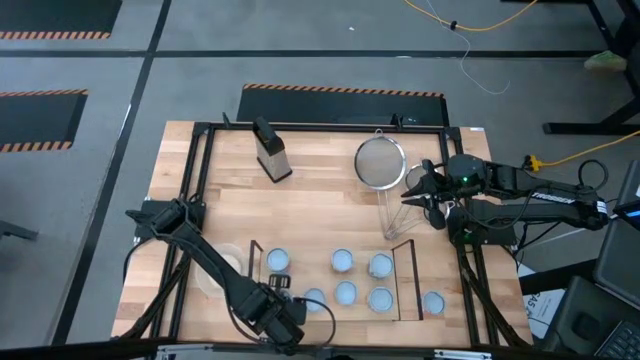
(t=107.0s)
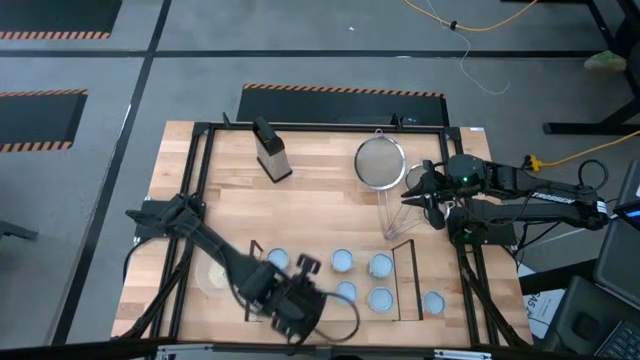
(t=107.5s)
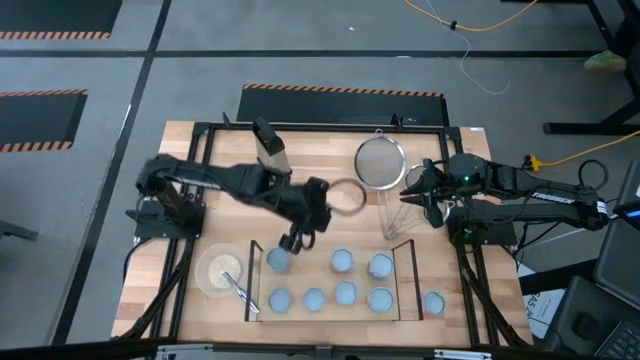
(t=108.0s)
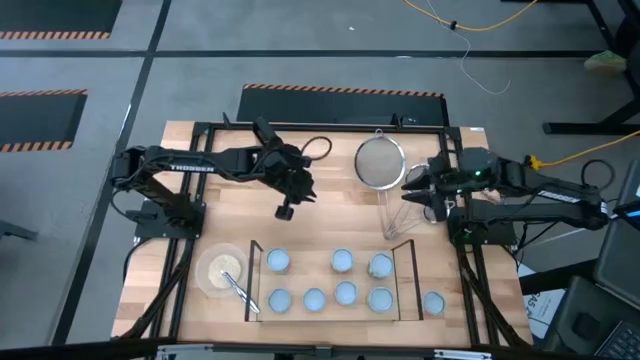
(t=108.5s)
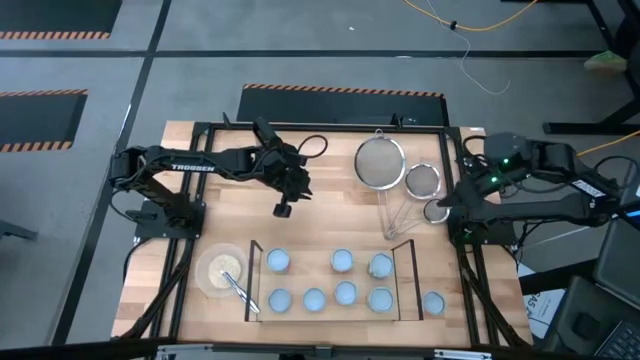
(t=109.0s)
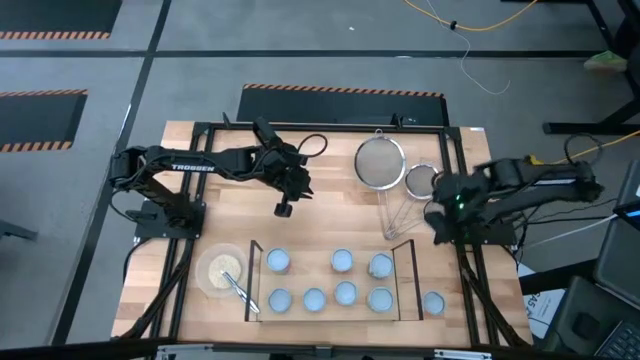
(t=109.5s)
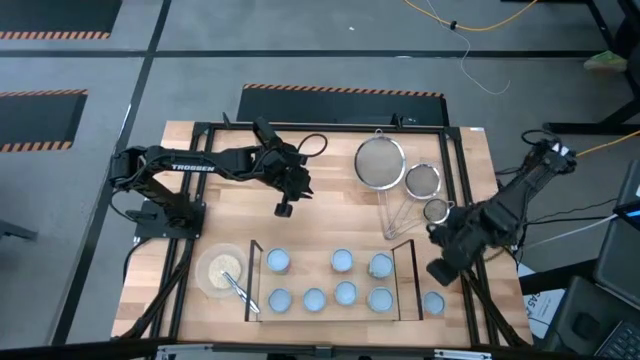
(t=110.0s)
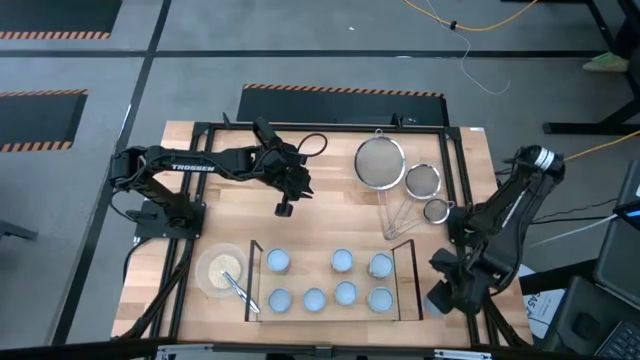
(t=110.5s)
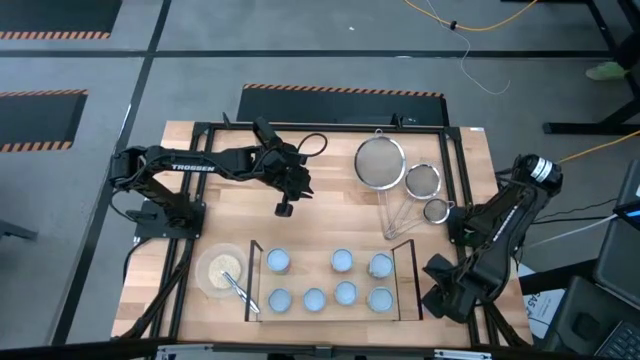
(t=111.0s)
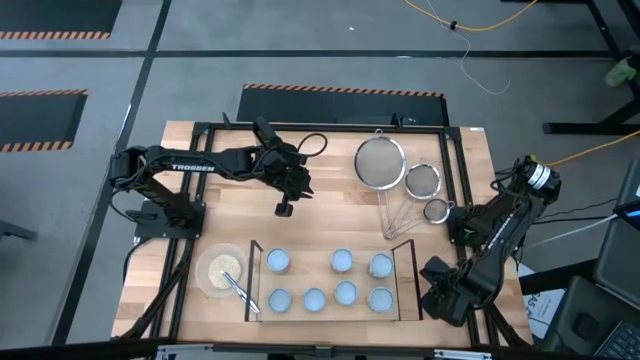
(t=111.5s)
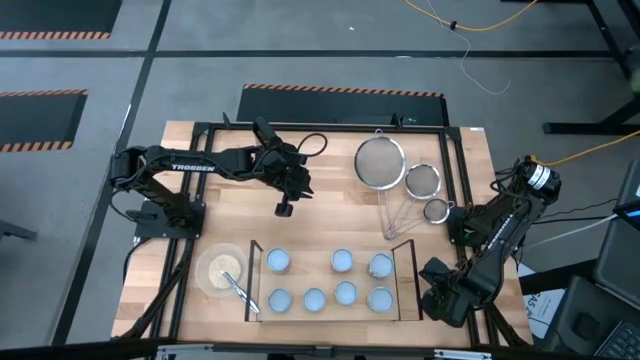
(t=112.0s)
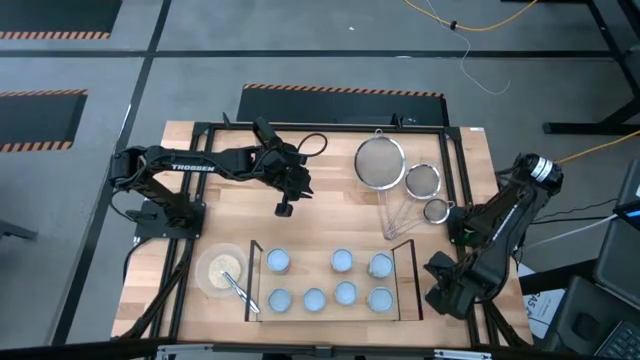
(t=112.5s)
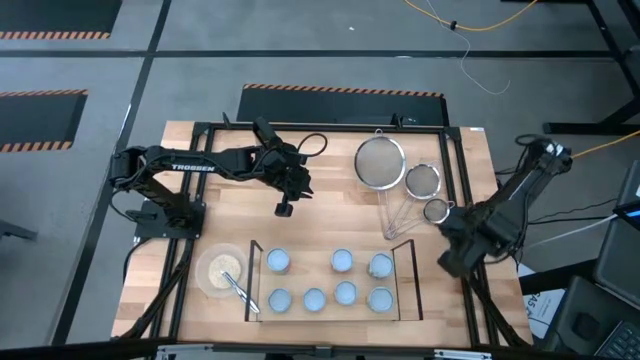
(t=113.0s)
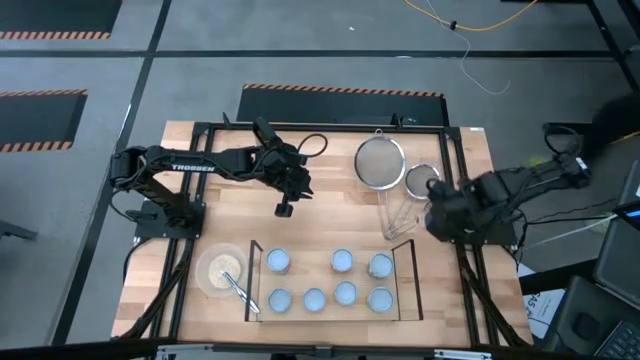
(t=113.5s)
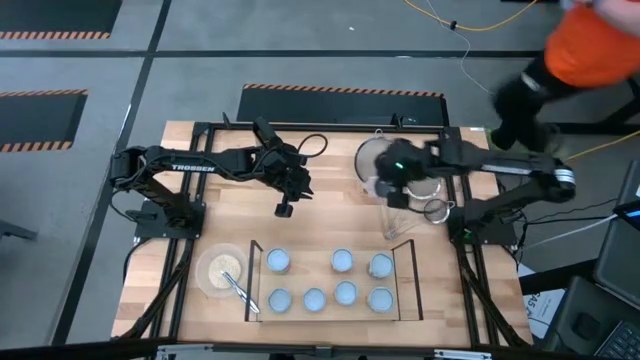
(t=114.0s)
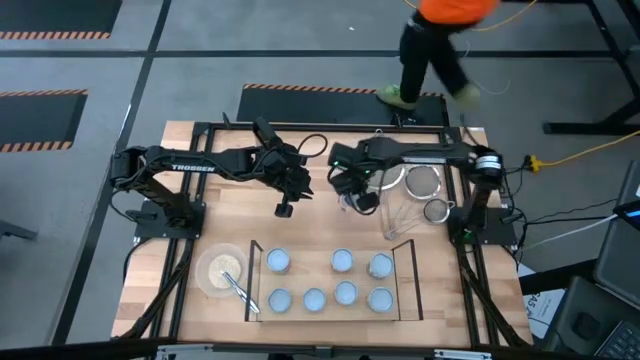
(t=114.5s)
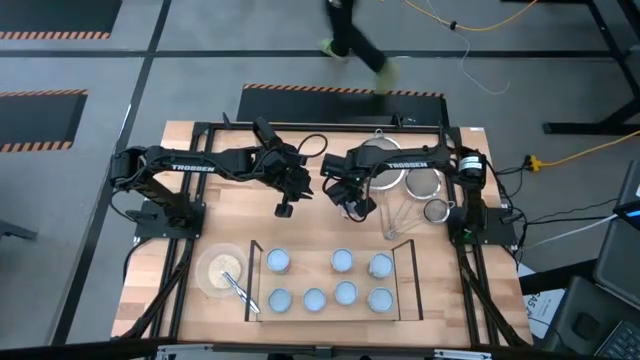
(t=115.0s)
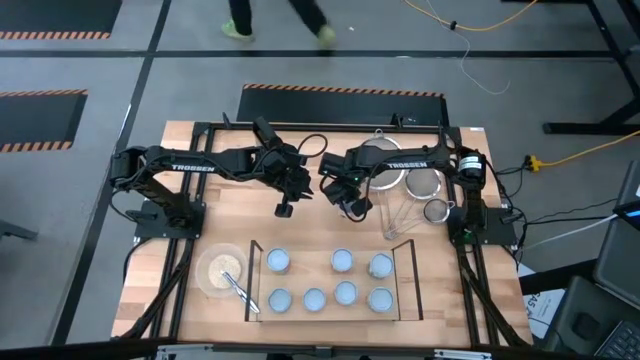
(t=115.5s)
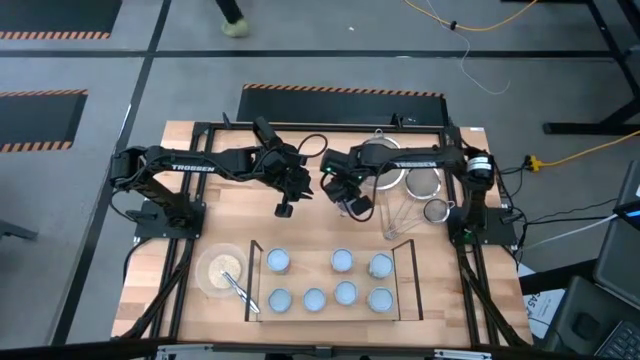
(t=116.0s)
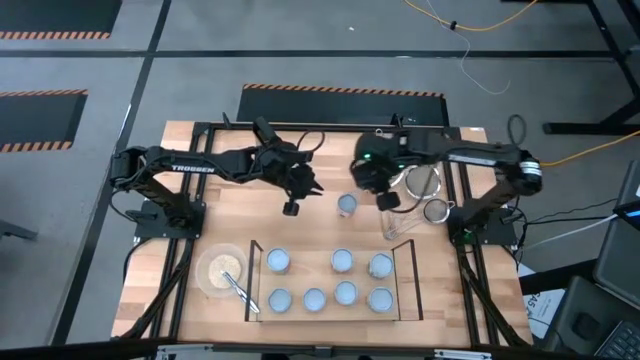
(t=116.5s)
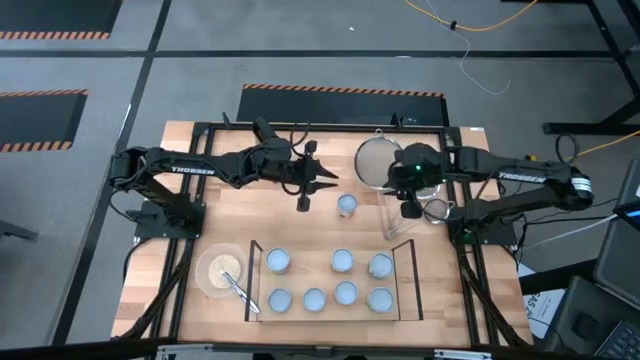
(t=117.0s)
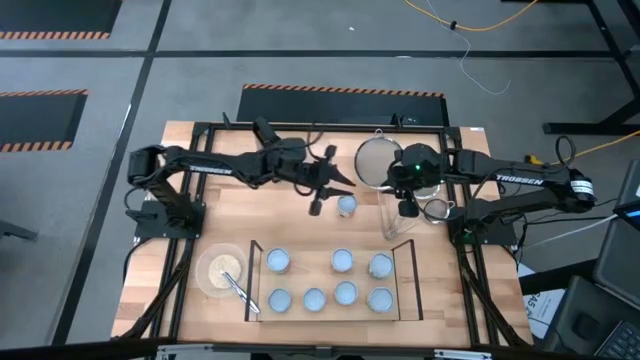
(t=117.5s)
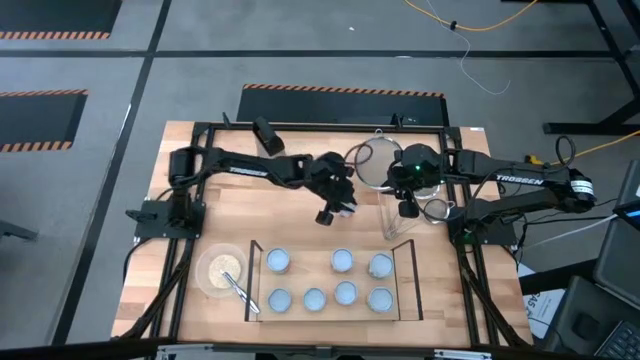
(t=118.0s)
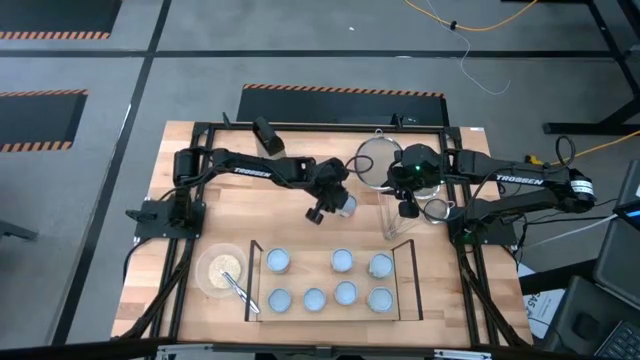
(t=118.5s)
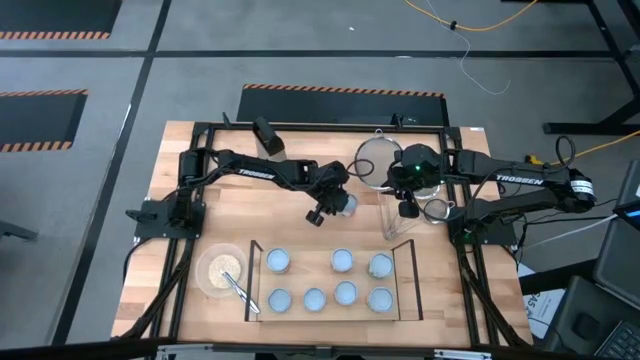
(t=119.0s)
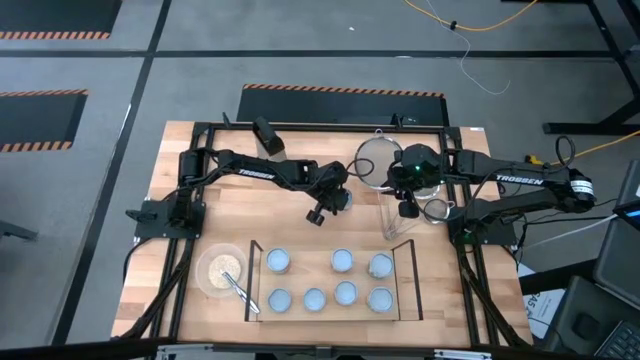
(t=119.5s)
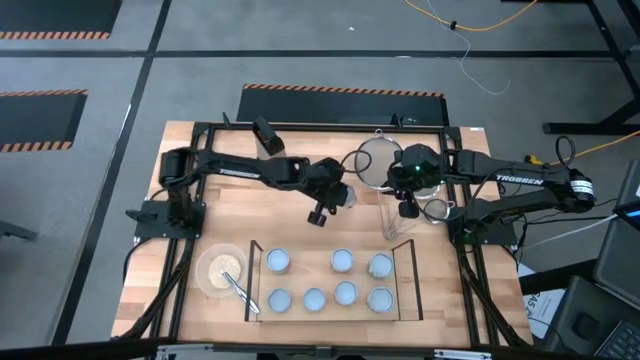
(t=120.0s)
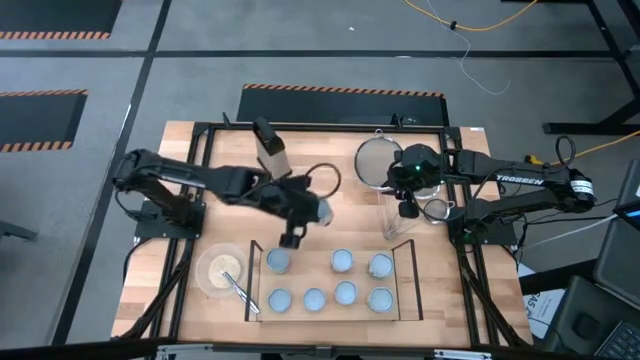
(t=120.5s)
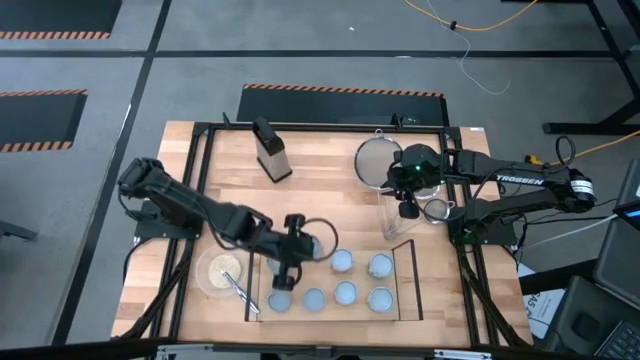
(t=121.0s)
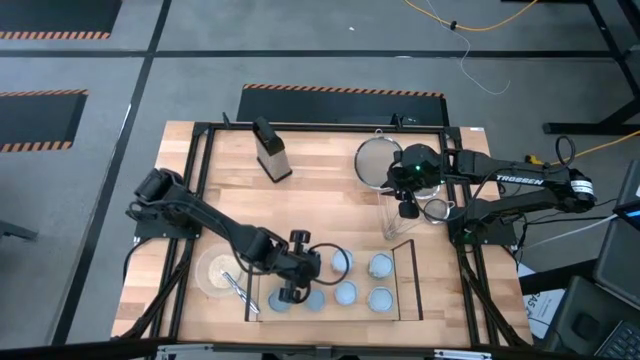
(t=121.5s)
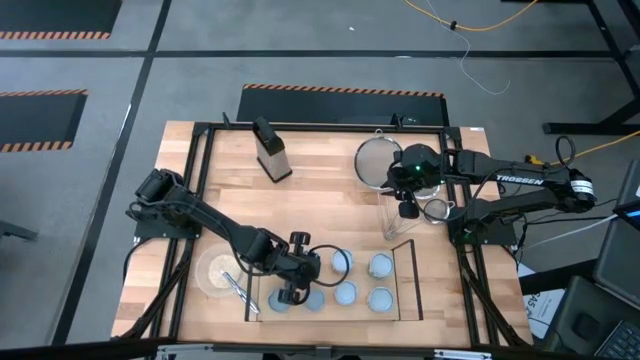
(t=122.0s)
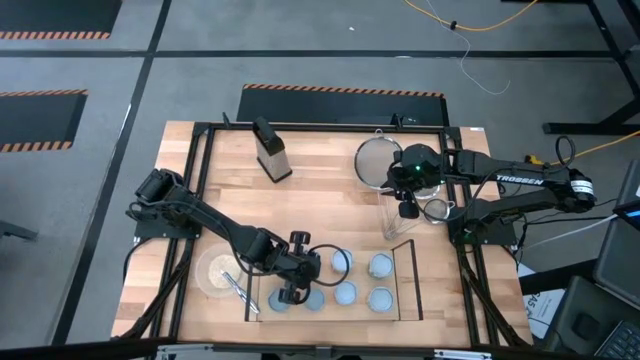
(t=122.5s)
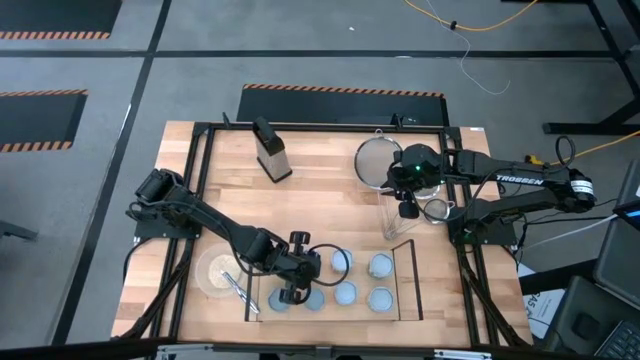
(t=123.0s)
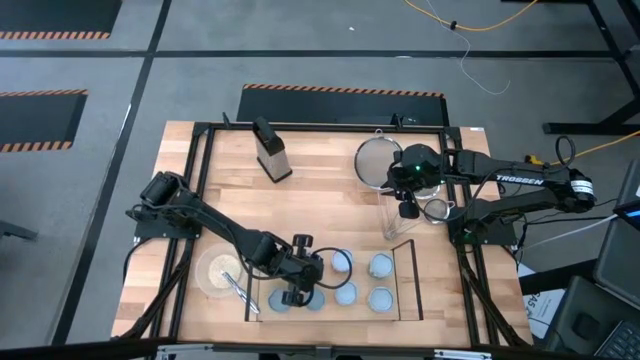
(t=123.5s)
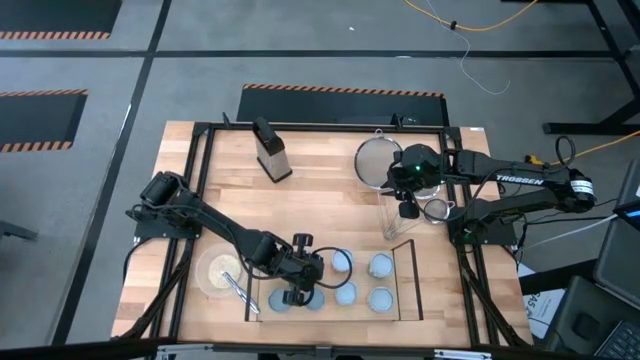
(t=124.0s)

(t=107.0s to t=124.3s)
Task: Pick and place cans onto a shelf
Put the canned diced tomatoes on the shelf

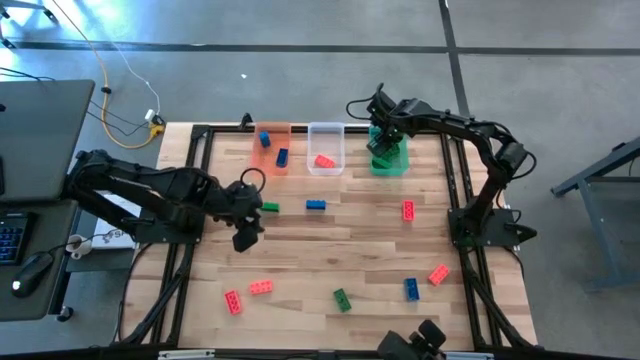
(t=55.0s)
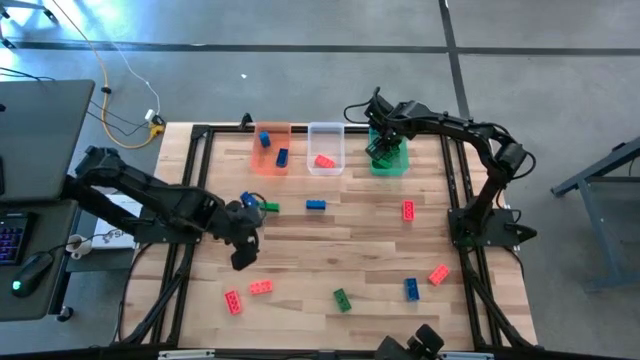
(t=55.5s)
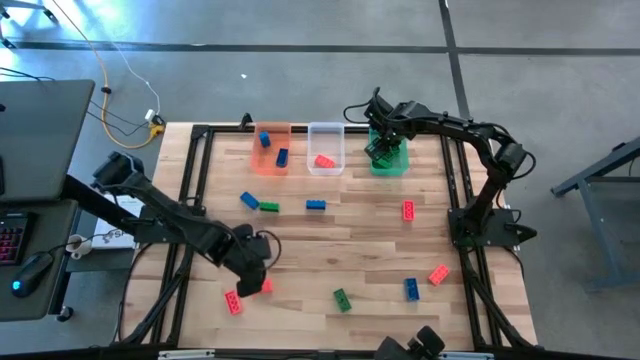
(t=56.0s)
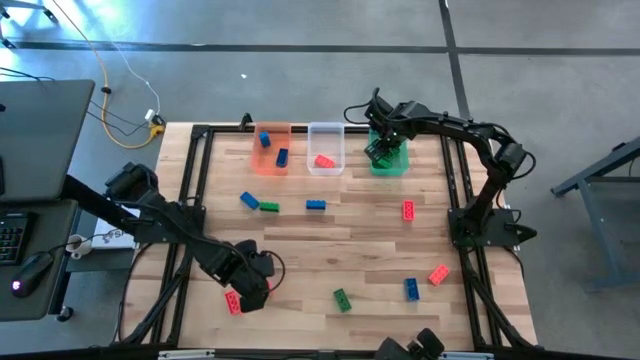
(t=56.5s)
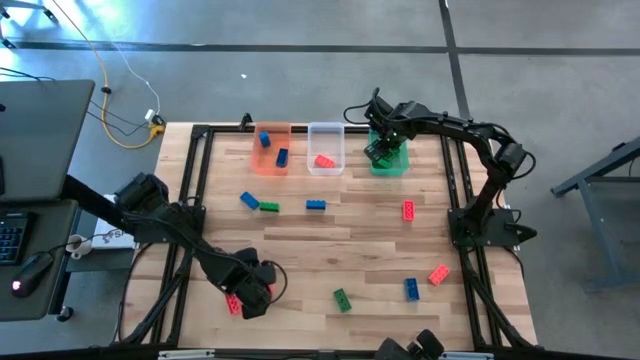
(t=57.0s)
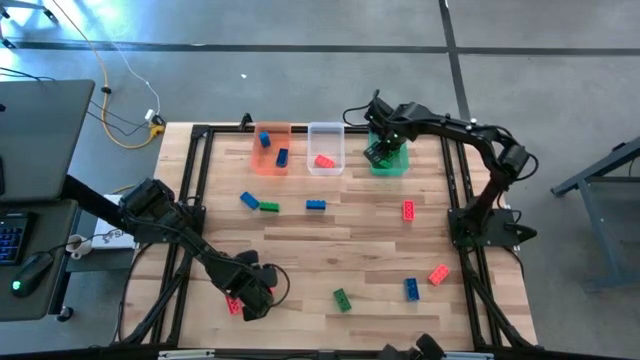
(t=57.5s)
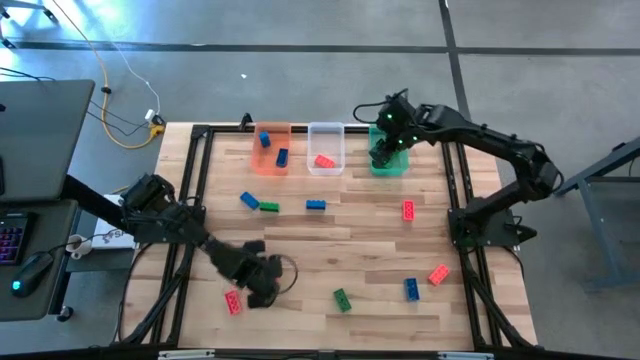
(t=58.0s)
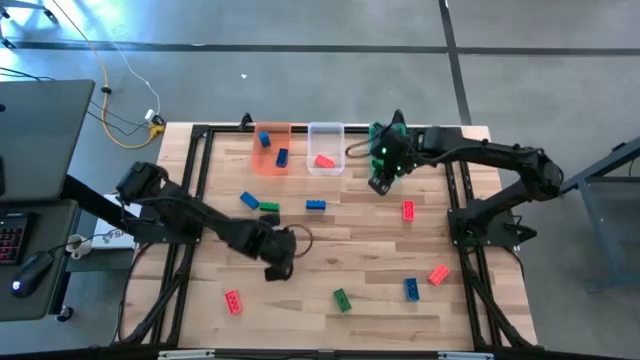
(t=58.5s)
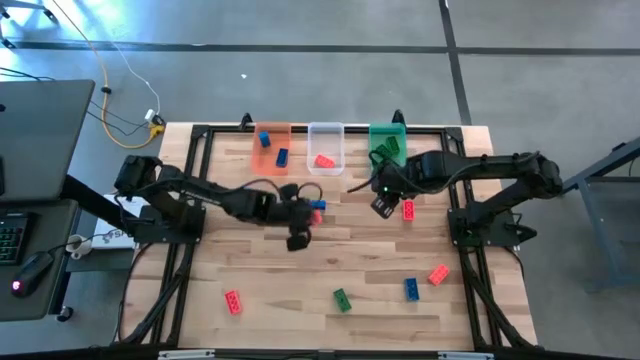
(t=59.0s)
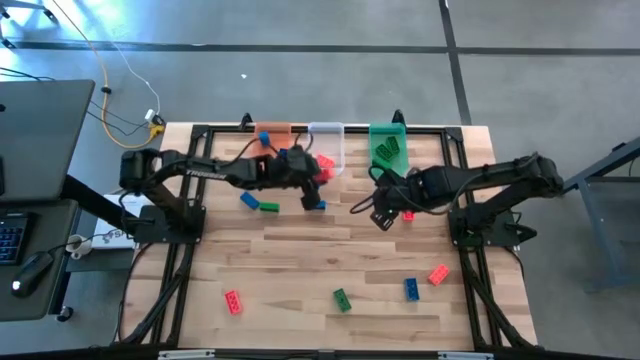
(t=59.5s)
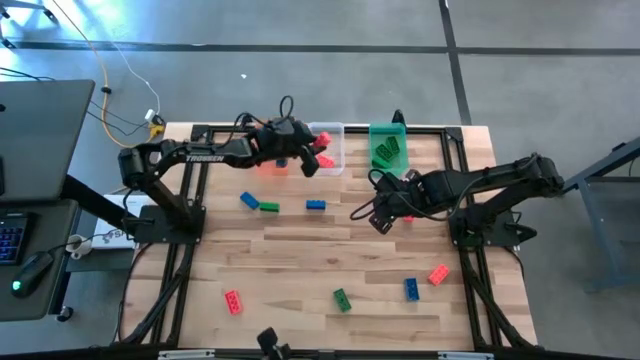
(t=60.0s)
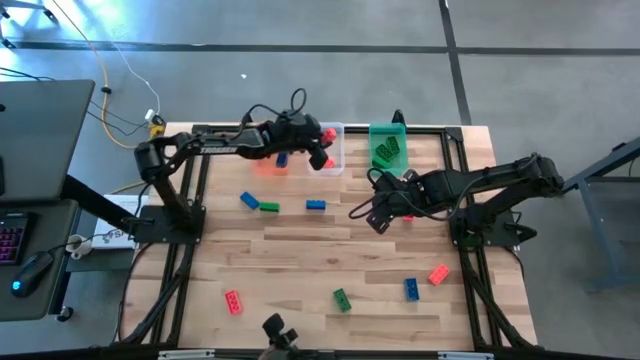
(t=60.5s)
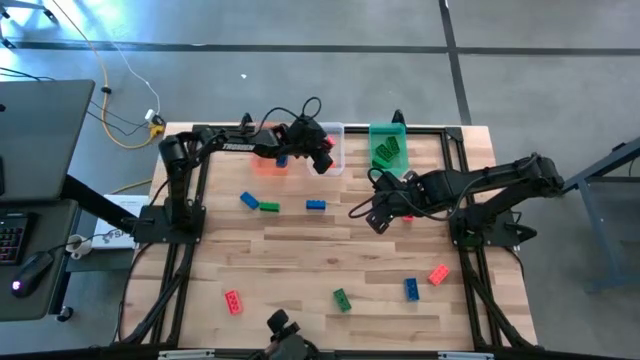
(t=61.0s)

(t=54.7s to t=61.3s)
Task: Sort & place blocks by color
Put the orange game piece into the white bin
